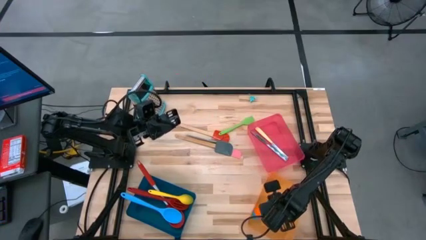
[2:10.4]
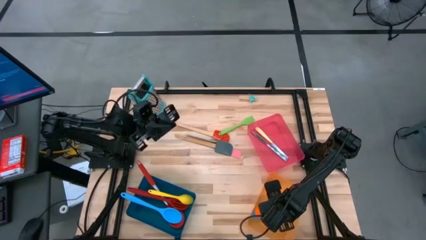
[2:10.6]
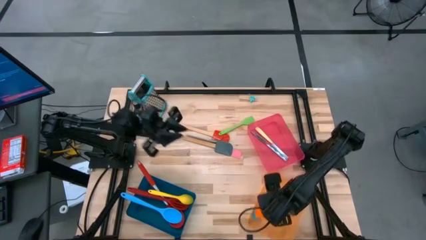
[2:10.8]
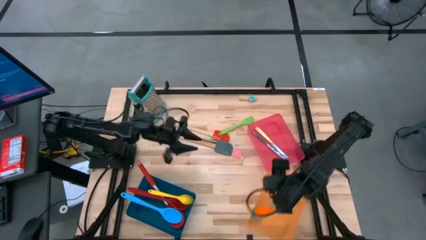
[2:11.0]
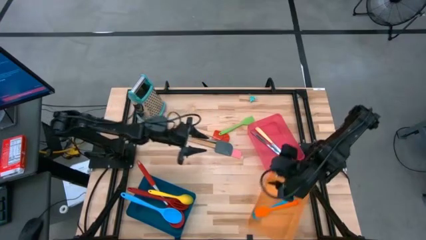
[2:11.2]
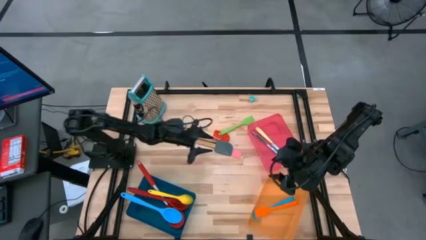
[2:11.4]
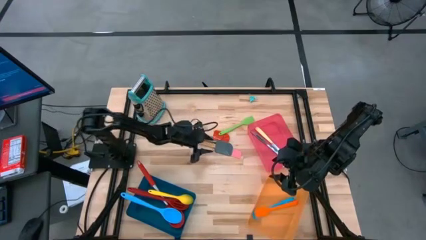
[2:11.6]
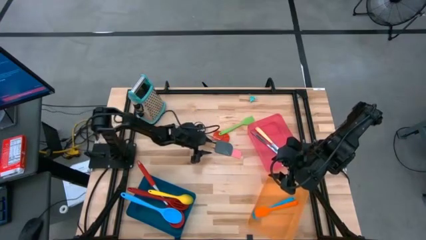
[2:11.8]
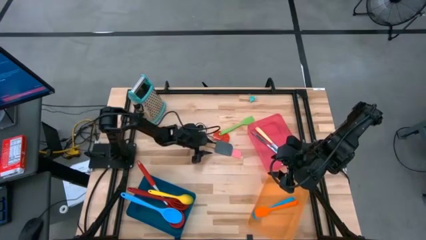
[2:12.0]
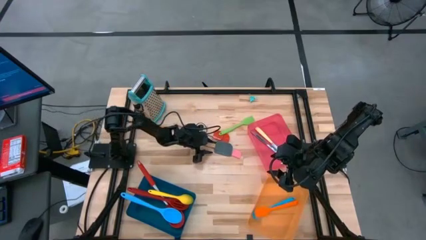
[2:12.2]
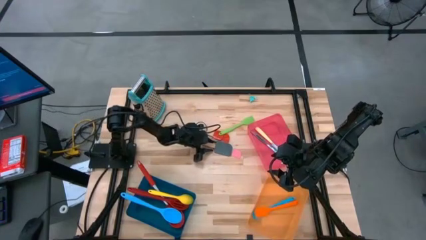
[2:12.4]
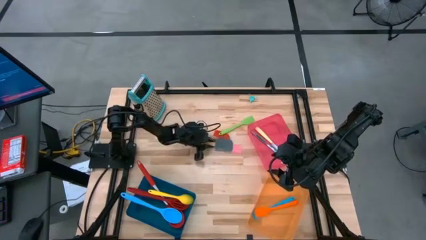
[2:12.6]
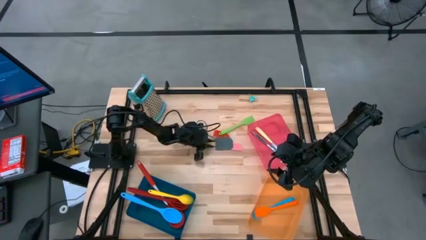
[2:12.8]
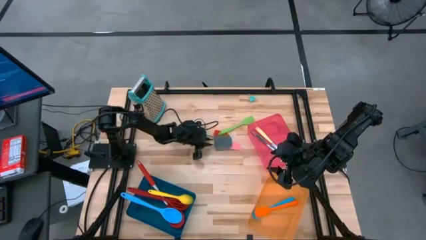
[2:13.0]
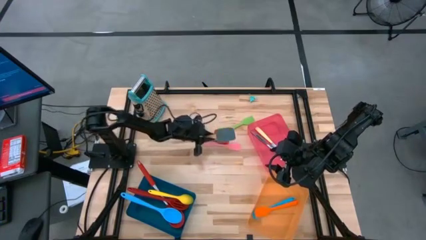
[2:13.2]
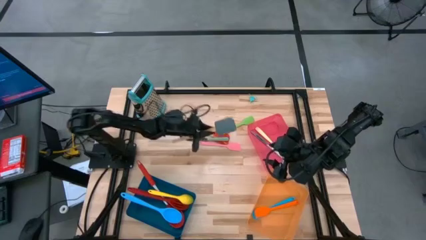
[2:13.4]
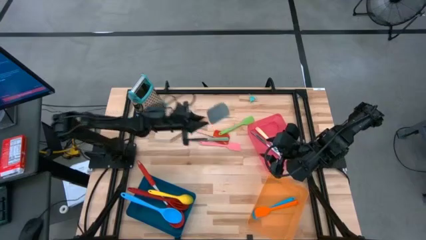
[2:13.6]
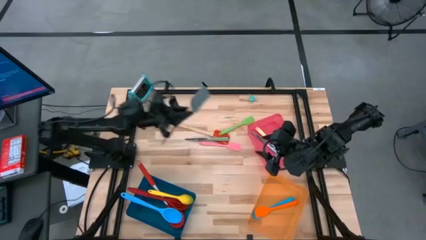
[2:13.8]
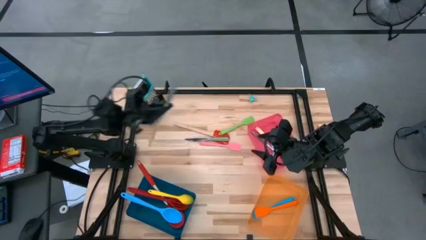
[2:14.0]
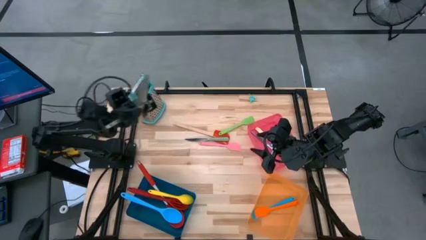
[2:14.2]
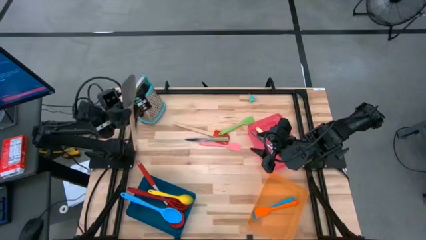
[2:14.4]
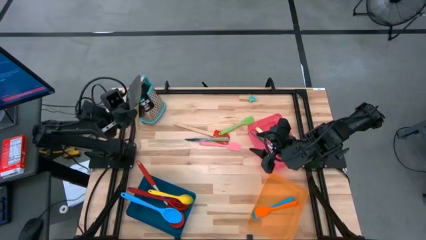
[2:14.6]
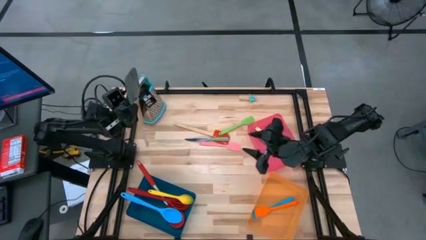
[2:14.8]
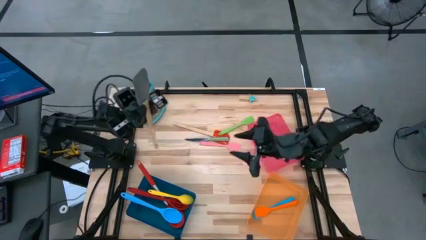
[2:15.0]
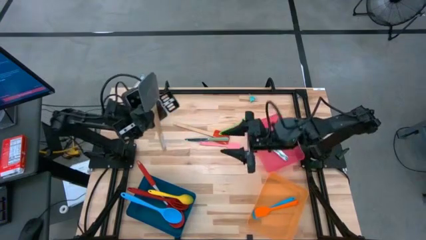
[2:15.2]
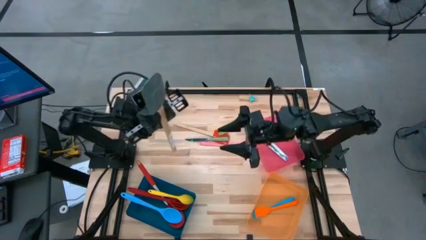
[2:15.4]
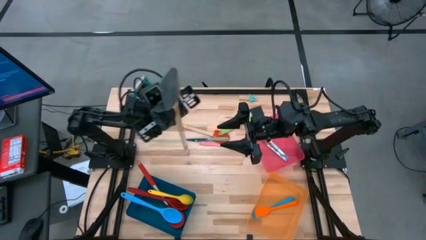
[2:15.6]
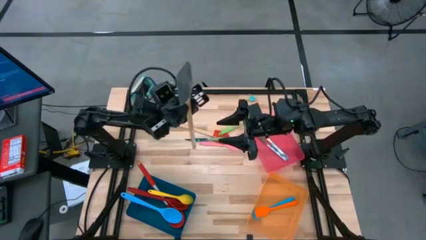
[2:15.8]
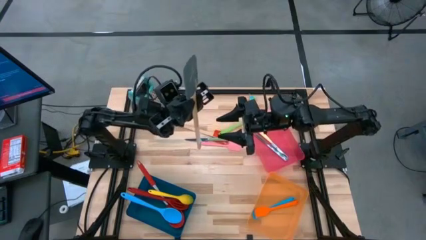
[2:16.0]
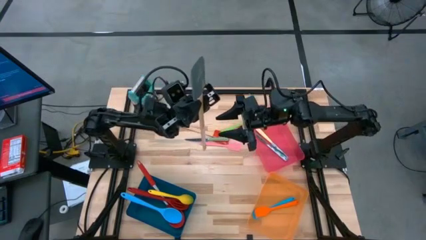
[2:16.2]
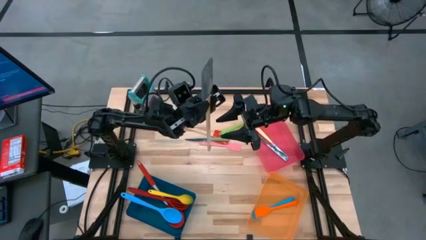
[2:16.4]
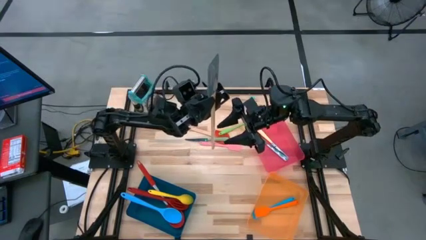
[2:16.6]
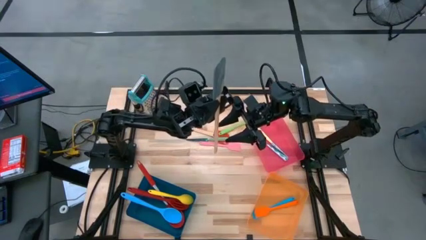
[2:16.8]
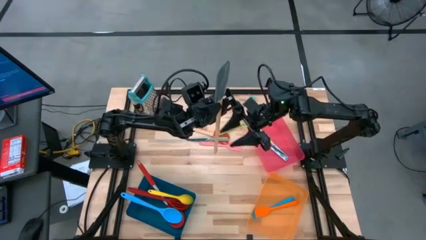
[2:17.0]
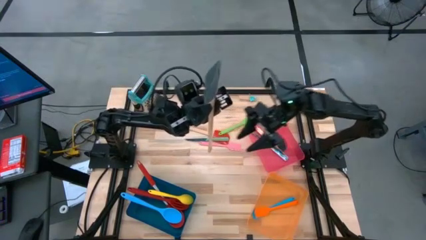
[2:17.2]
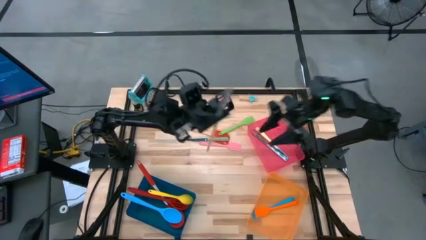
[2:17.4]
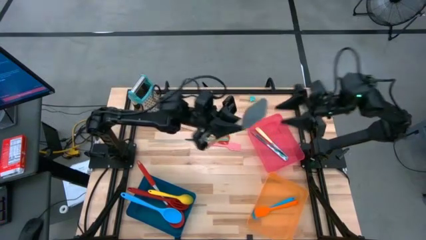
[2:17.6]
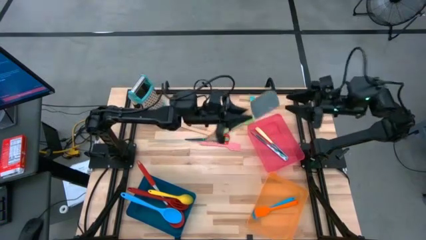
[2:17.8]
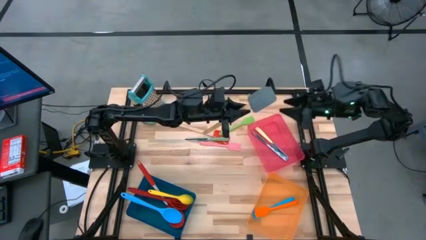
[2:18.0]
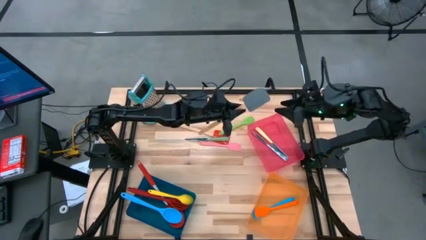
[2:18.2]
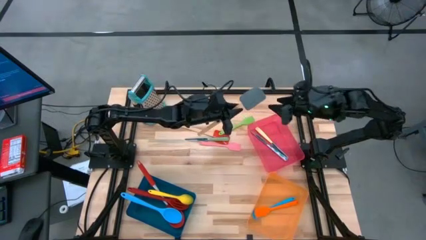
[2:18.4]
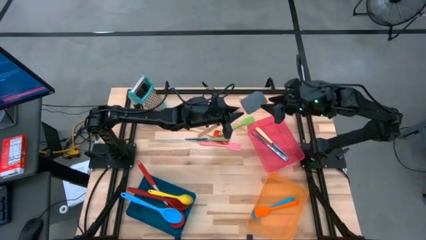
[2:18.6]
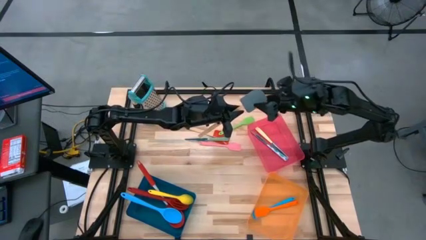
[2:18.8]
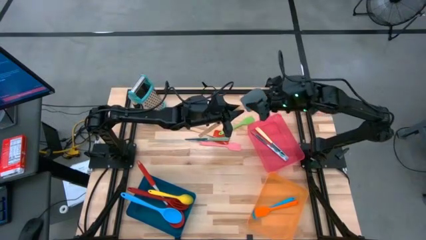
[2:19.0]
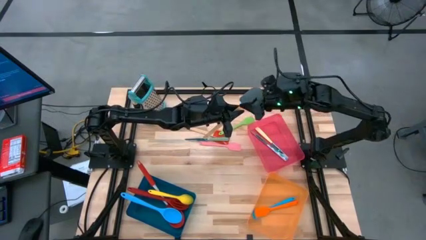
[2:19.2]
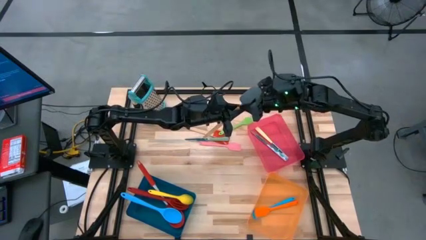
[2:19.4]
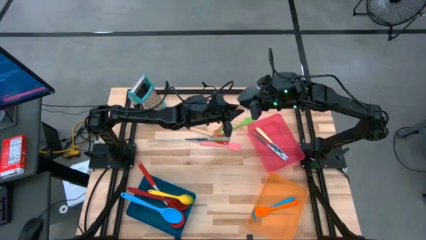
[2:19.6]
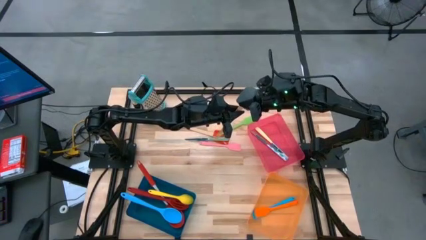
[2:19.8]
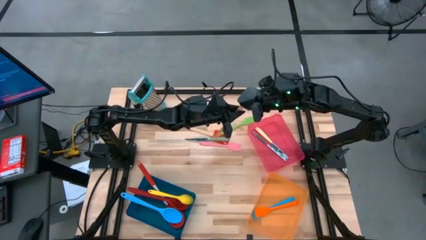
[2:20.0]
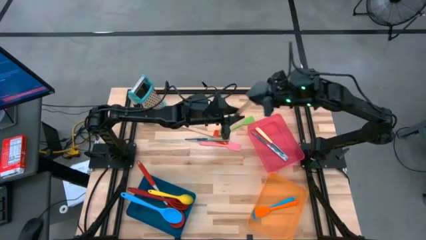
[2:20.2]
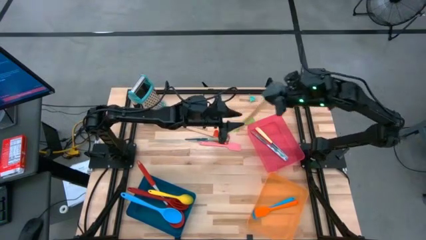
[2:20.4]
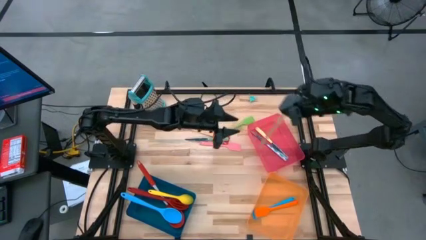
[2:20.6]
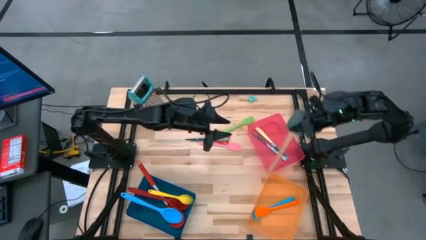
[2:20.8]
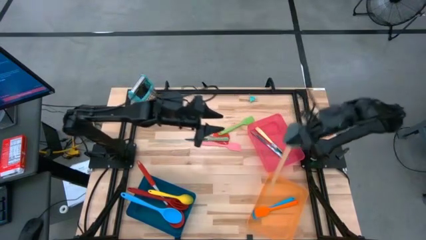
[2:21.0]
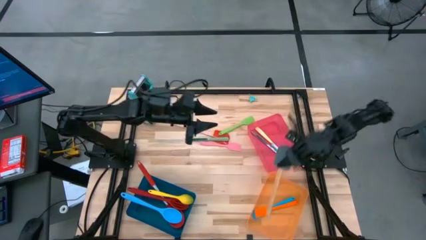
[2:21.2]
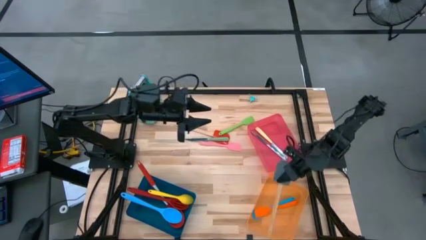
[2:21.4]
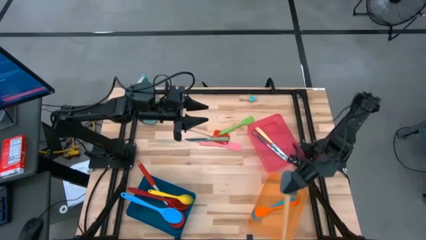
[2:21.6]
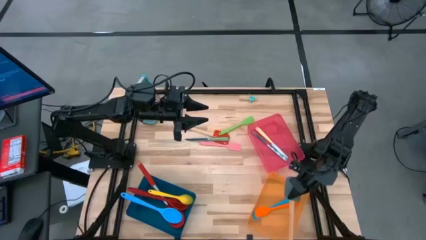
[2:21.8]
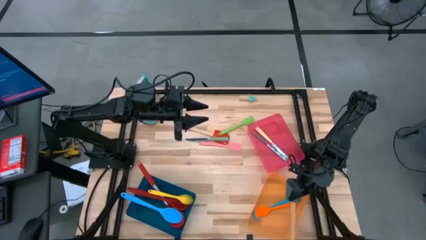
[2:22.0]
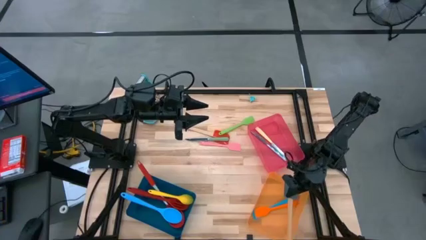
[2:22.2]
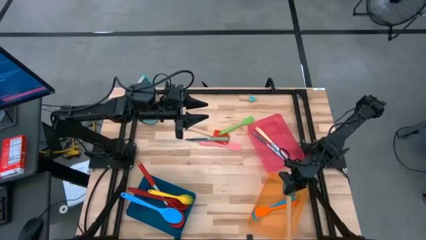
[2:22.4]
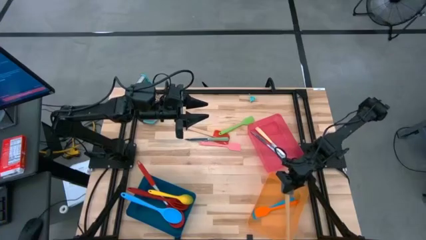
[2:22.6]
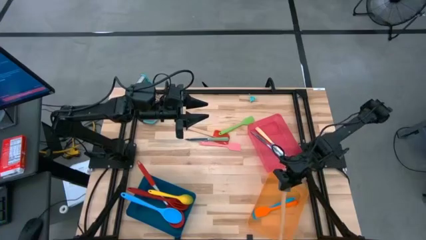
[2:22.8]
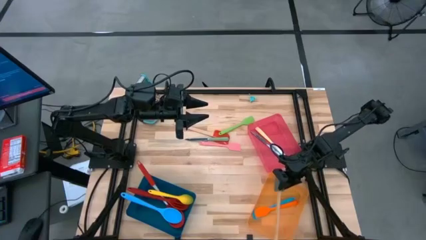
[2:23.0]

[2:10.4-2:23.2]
Task: Pick & Place Kitchen Items
Put the gray spatula into the orange bin

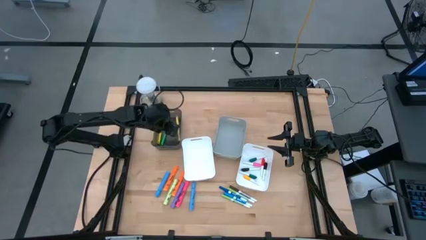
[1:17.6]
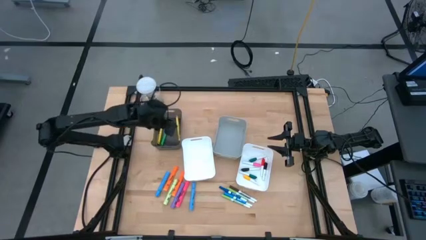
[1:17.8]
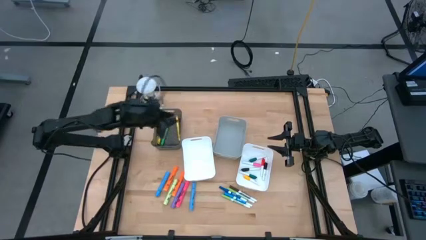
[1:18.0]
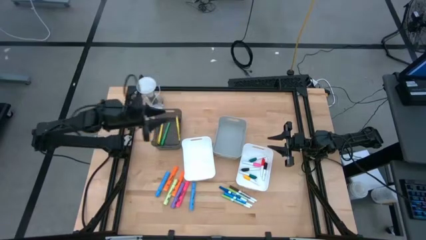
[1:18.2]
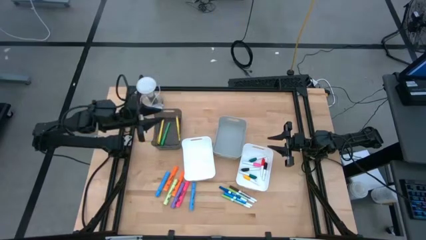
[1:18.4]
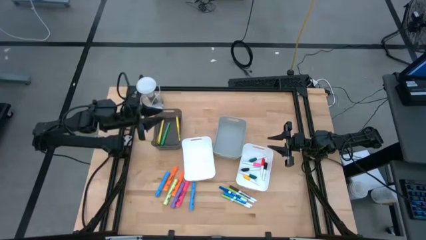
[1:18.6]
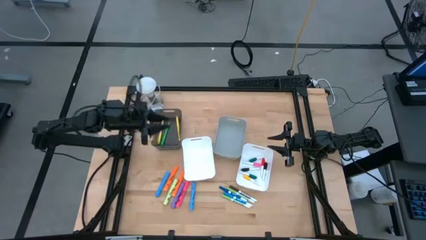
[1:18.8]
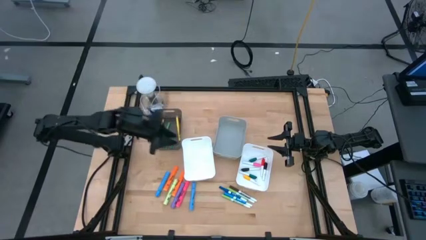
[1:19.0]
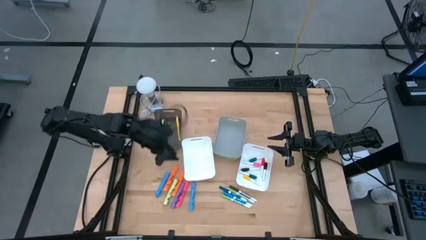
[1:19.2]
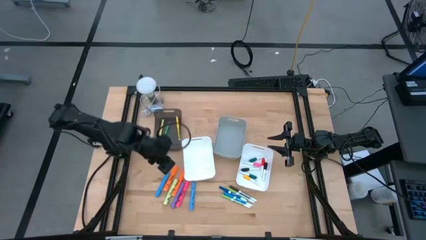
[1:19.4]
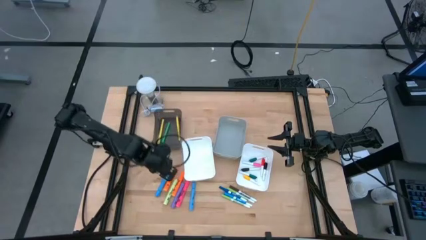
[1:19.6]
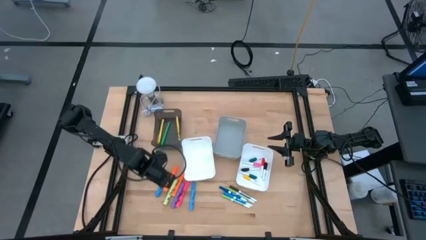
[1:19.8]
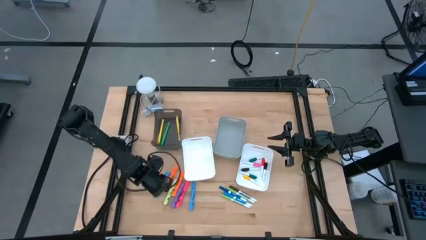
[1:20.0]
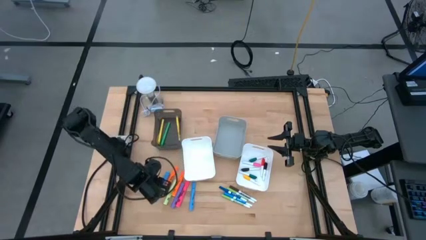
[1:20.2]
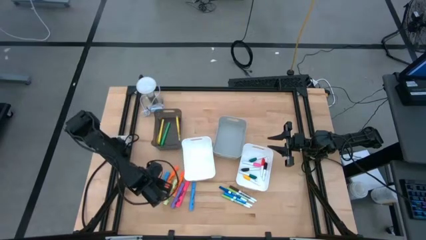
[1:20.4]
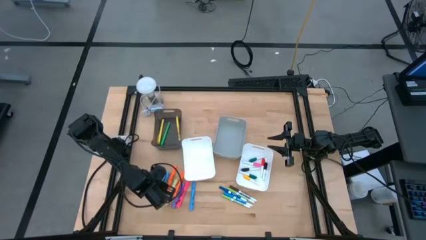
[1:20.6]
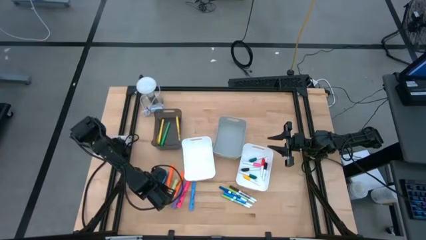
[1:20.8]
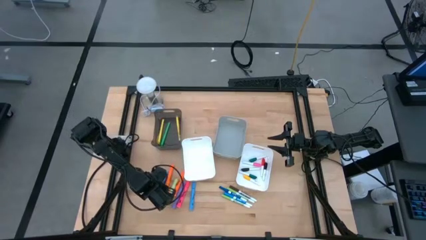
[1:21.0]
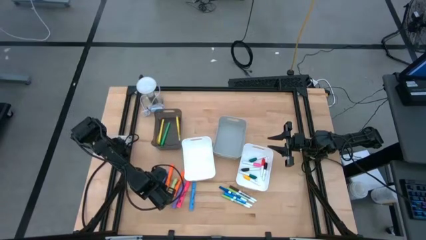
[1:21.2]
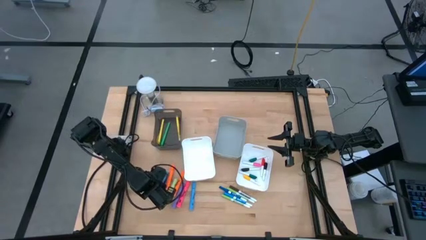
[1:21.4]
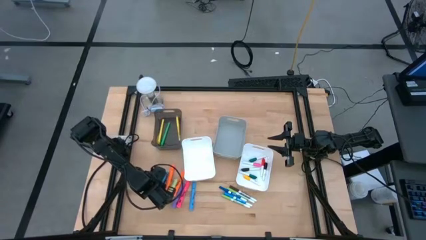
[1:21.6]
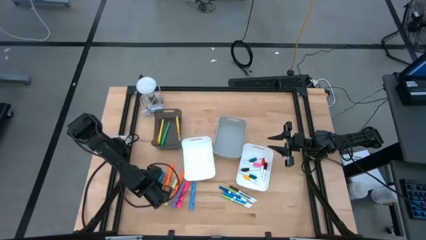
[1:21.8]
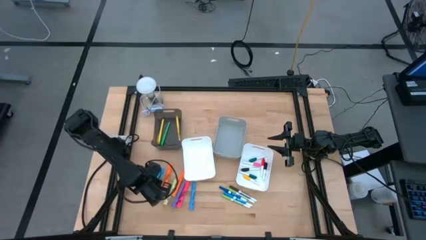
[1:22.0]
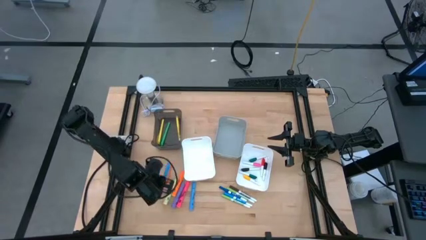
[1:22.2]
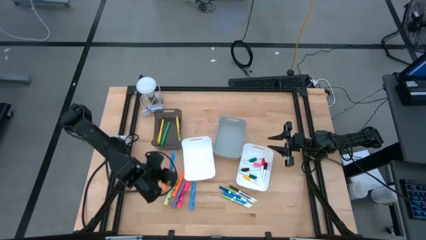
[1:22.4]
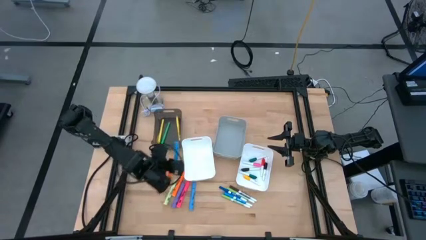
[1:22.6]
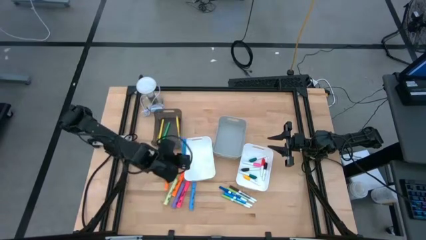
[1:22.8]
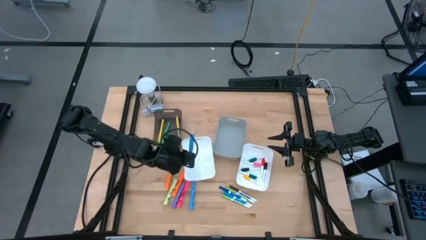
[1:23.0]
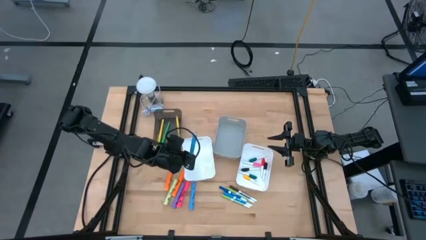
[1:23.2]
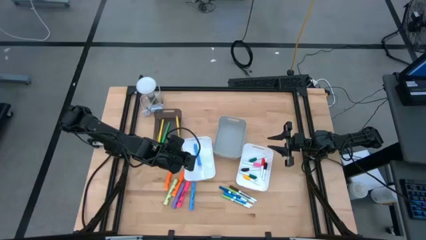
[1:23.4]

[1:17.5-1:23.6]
Task: Pick & Place Markers
Put the left blue highlighter into the left white bin
